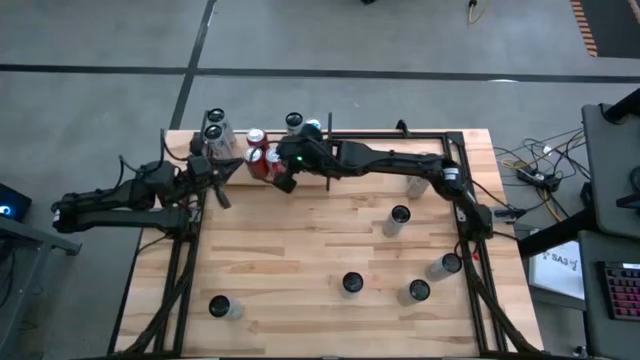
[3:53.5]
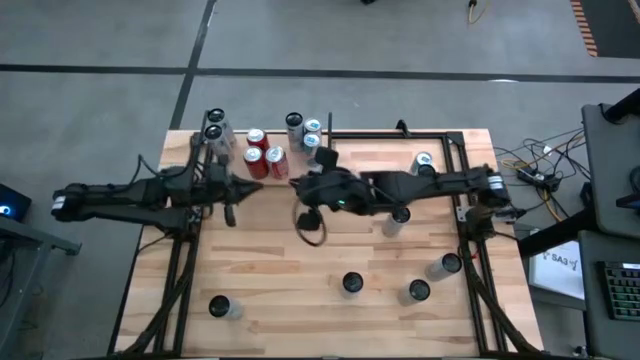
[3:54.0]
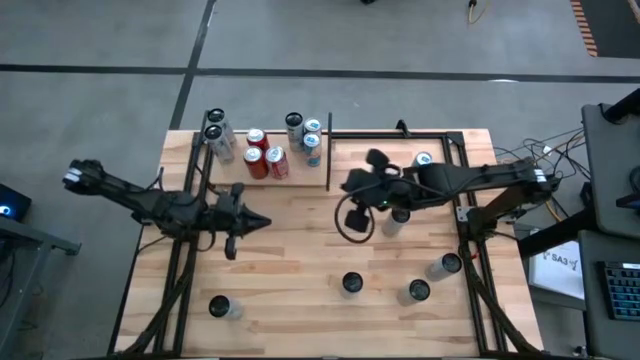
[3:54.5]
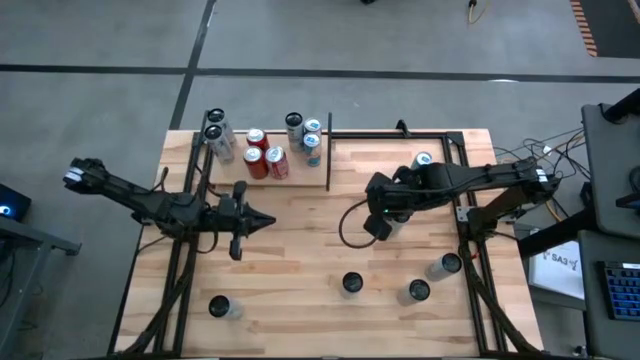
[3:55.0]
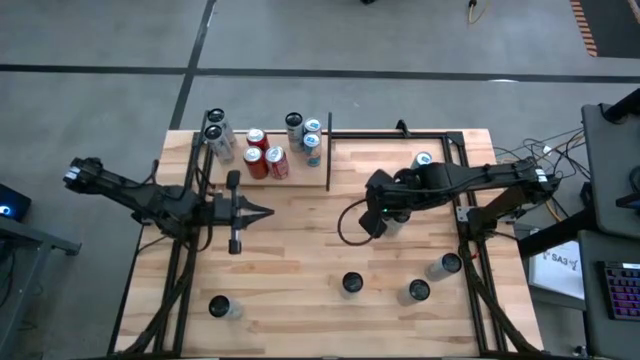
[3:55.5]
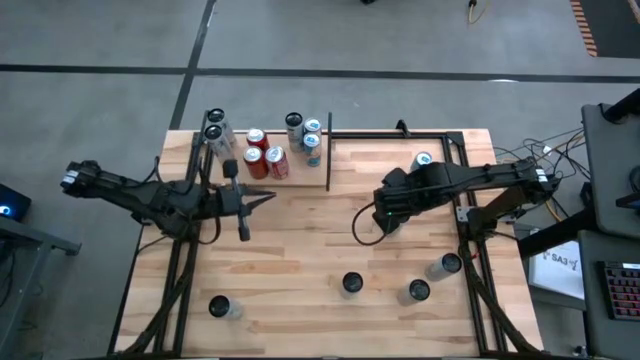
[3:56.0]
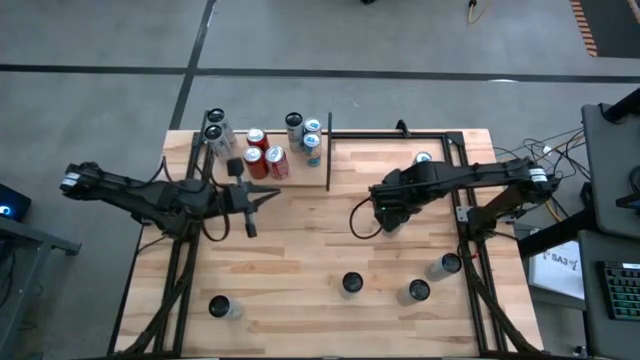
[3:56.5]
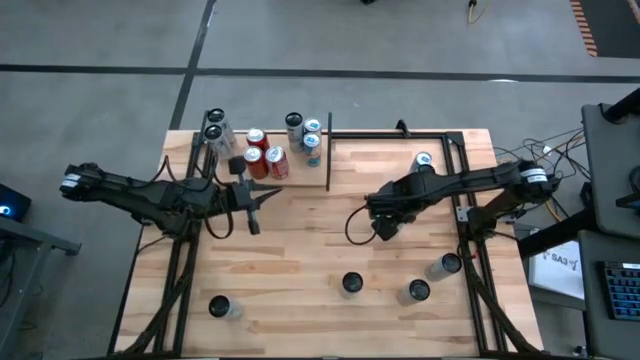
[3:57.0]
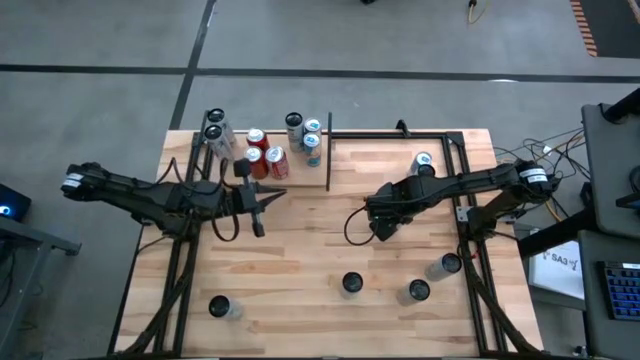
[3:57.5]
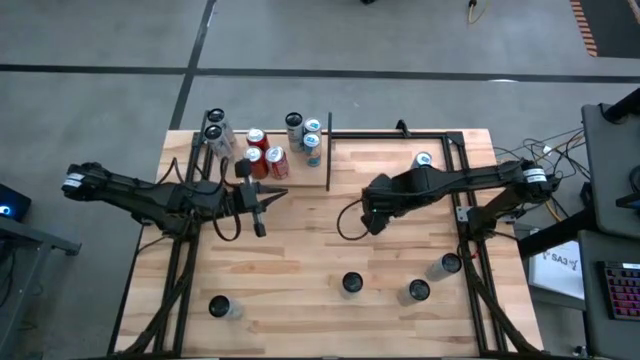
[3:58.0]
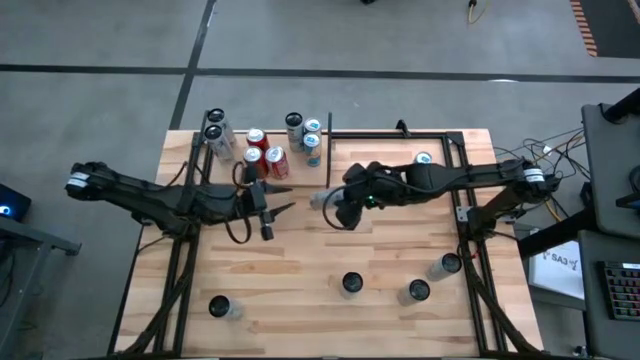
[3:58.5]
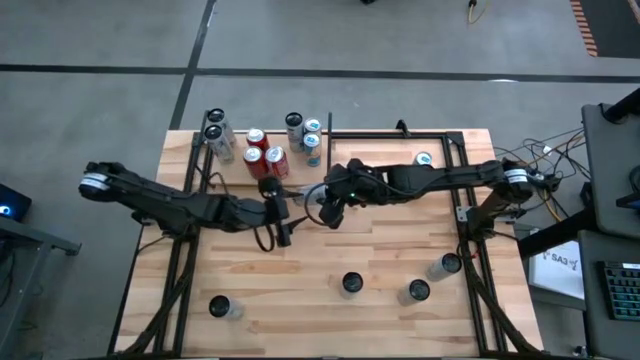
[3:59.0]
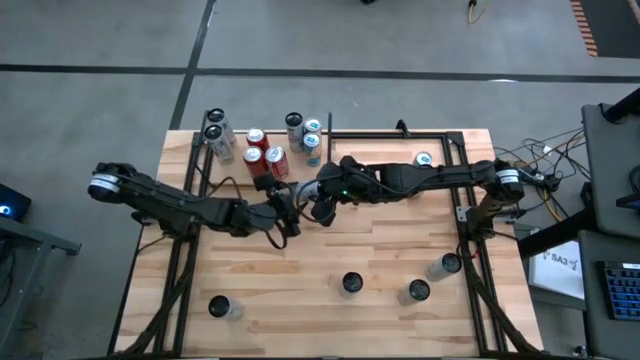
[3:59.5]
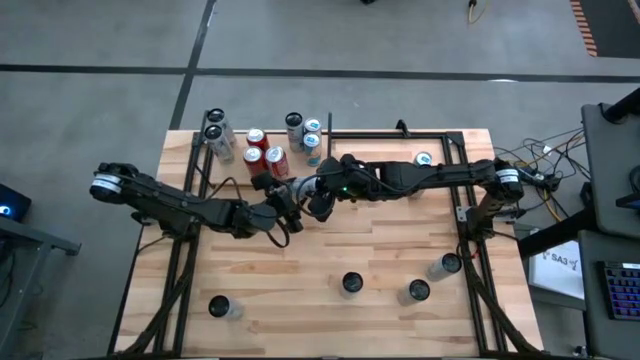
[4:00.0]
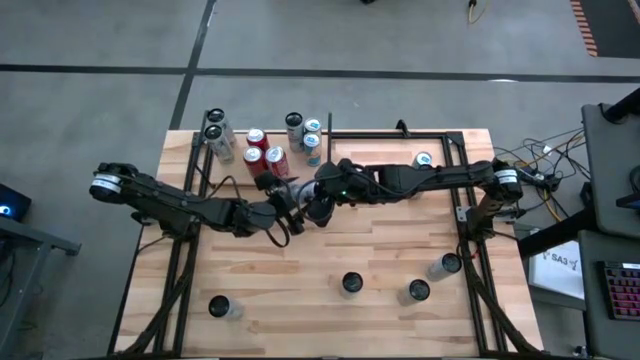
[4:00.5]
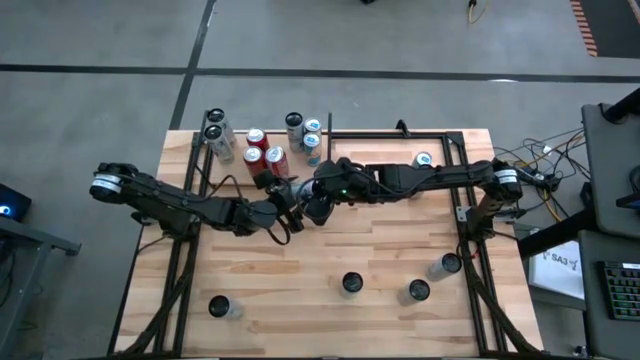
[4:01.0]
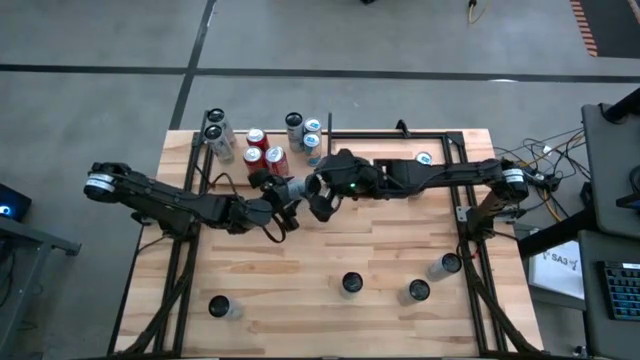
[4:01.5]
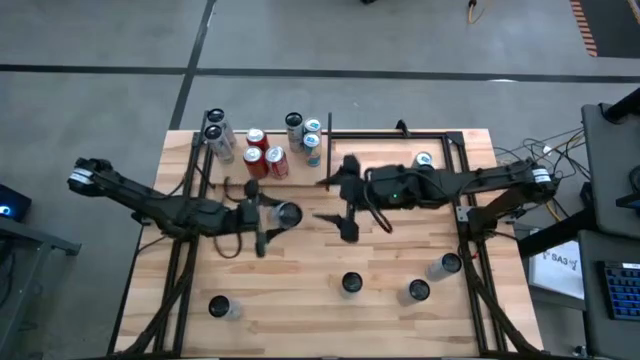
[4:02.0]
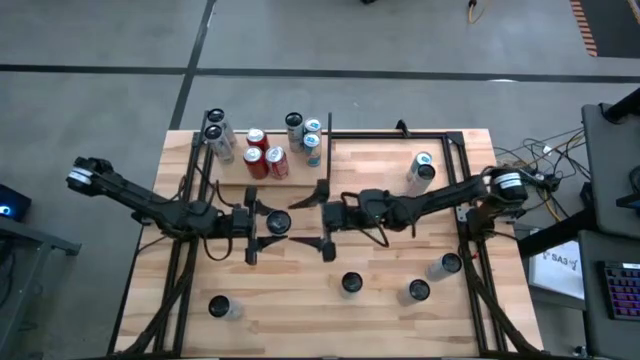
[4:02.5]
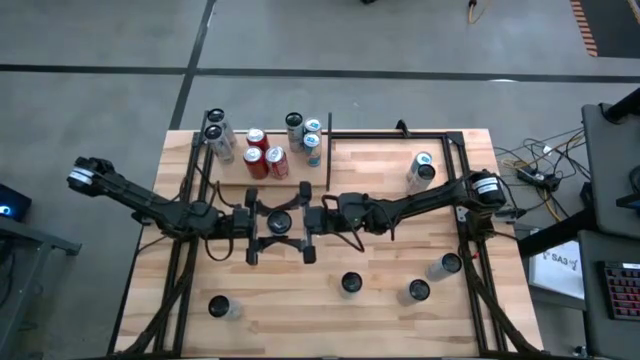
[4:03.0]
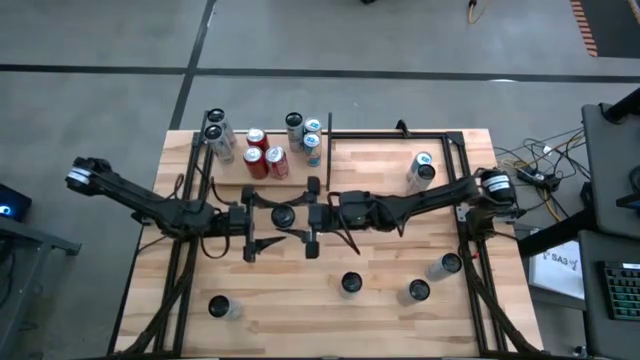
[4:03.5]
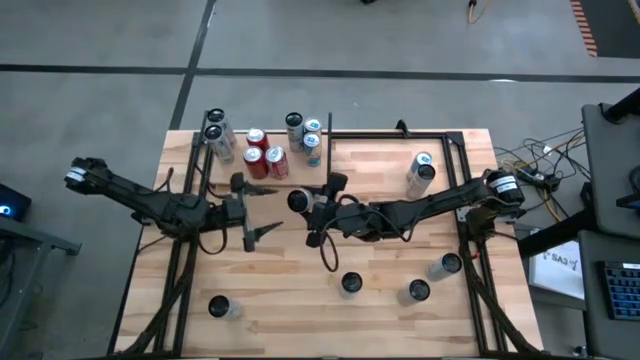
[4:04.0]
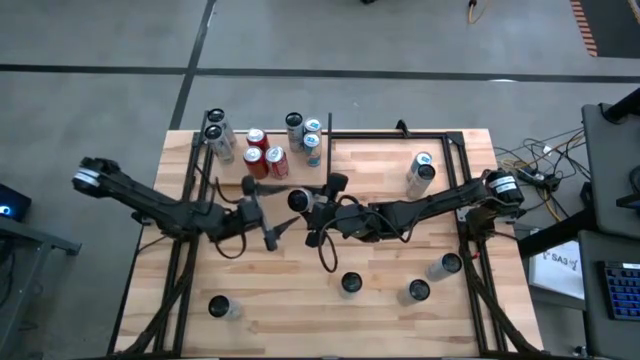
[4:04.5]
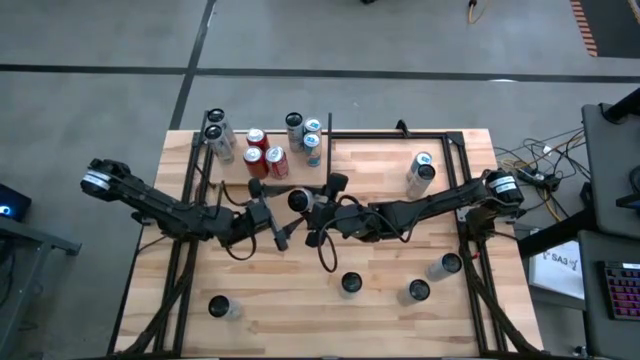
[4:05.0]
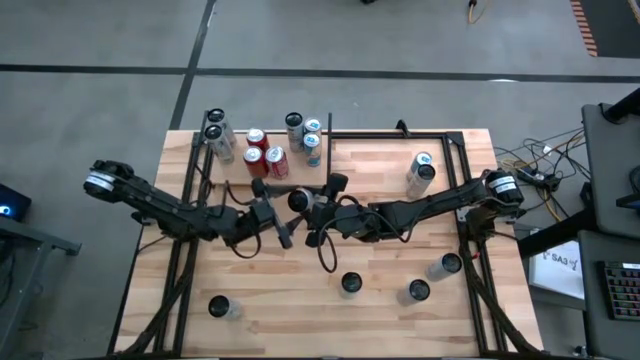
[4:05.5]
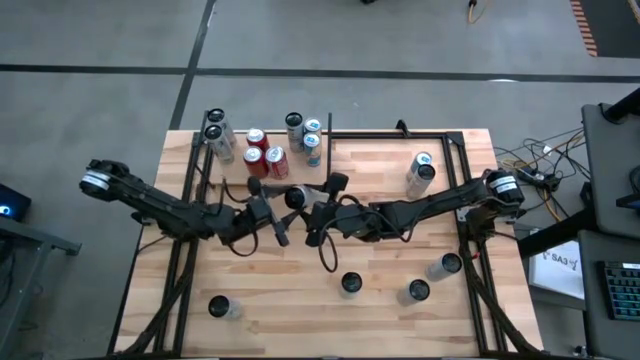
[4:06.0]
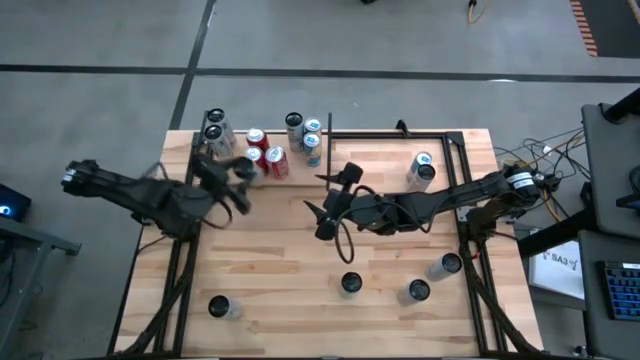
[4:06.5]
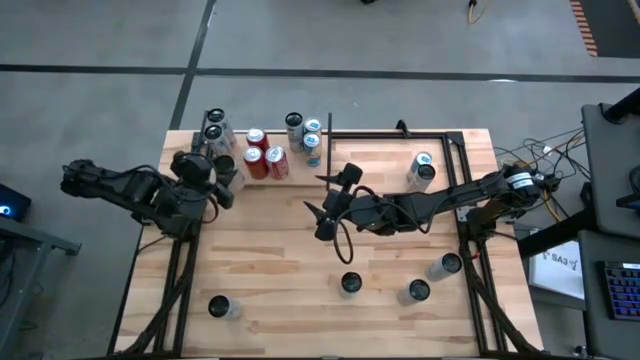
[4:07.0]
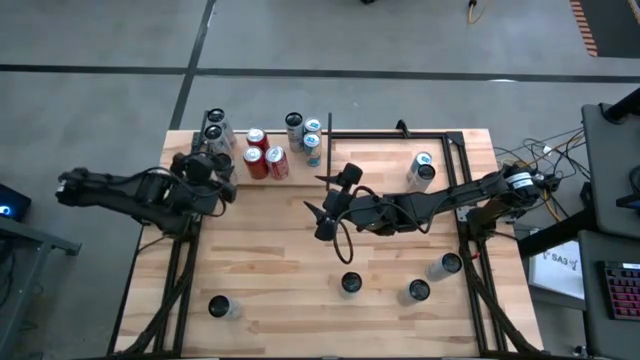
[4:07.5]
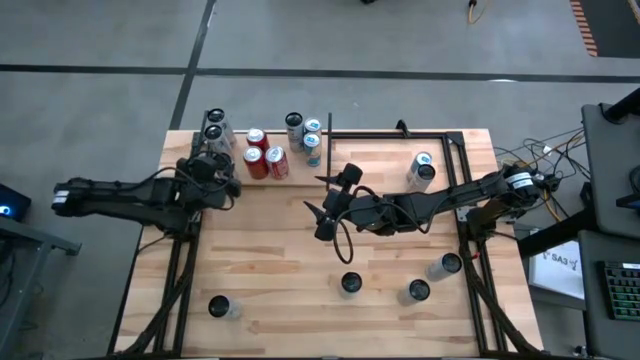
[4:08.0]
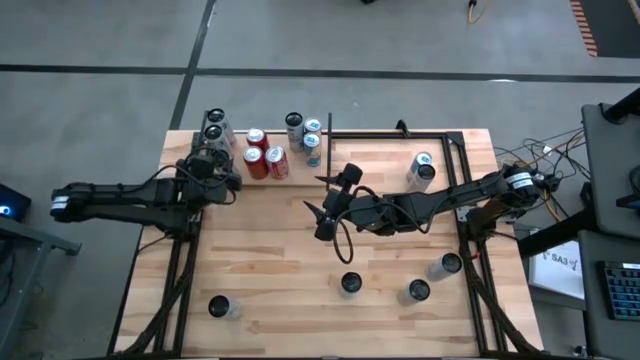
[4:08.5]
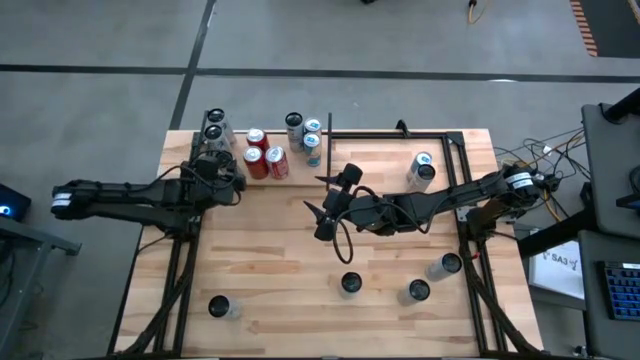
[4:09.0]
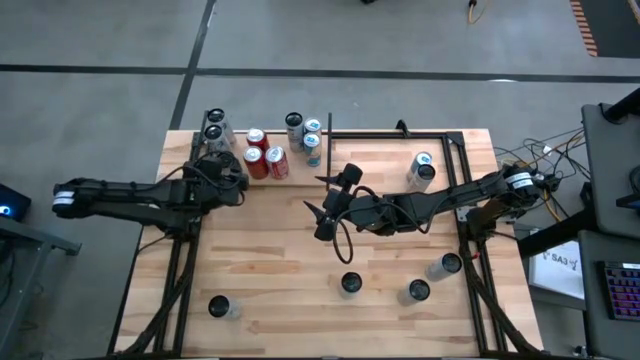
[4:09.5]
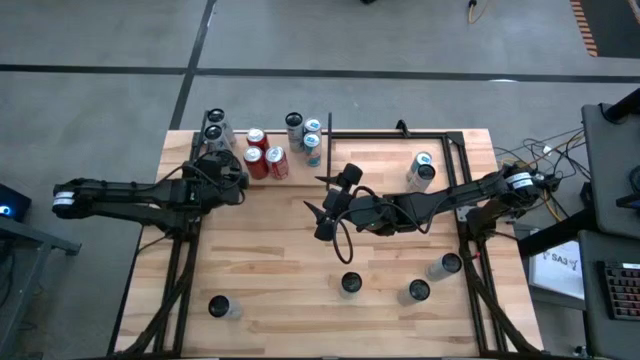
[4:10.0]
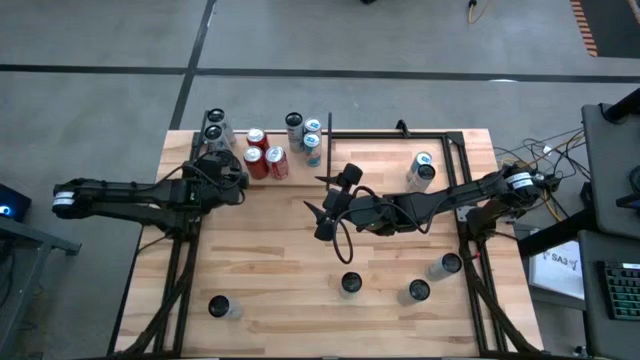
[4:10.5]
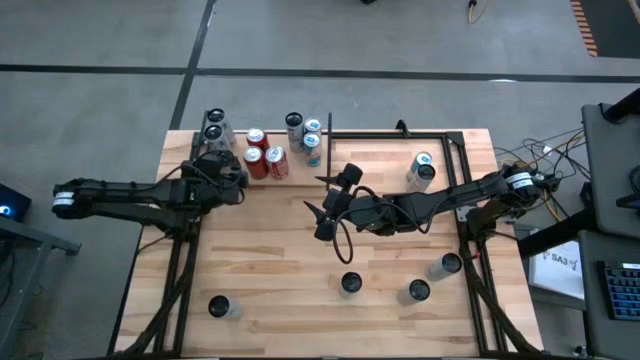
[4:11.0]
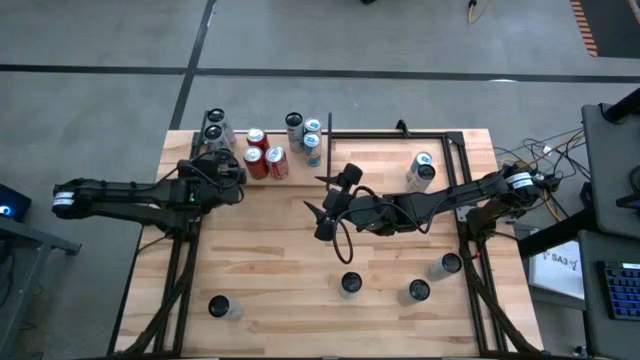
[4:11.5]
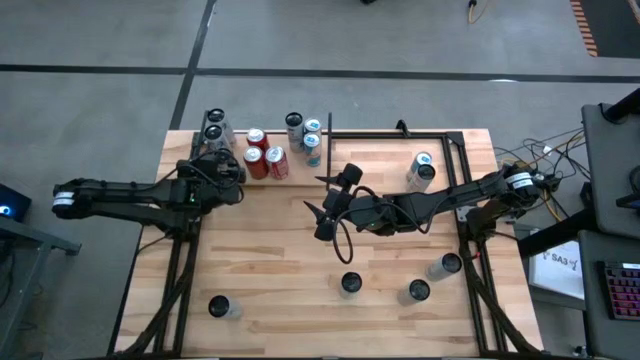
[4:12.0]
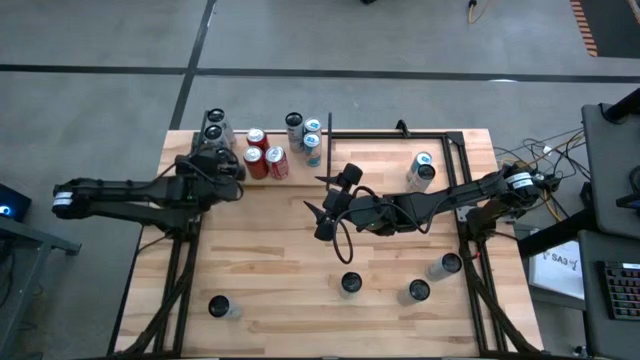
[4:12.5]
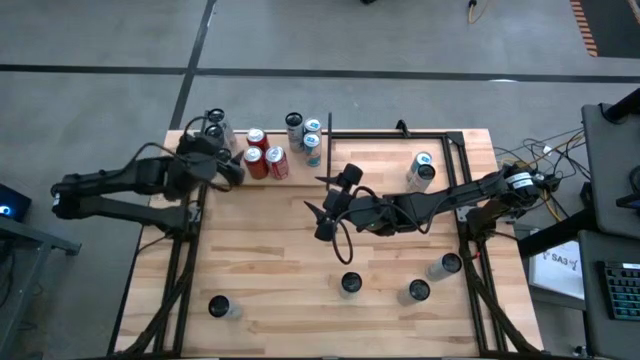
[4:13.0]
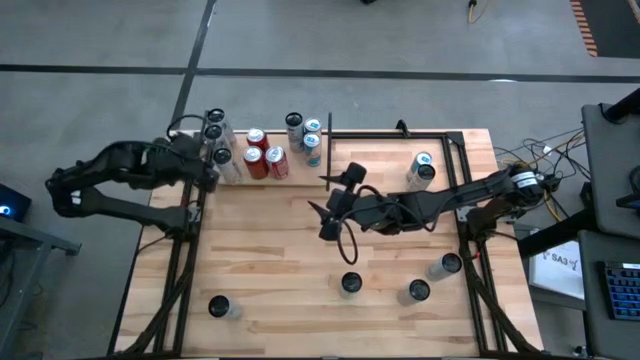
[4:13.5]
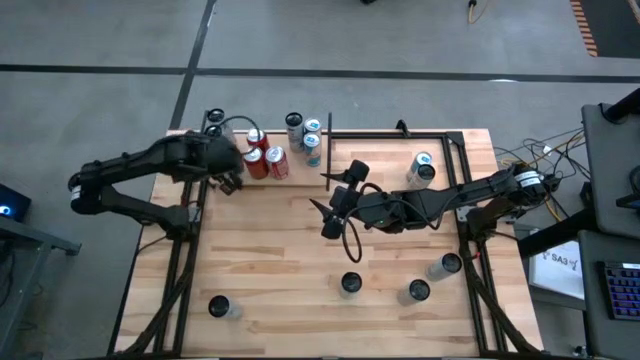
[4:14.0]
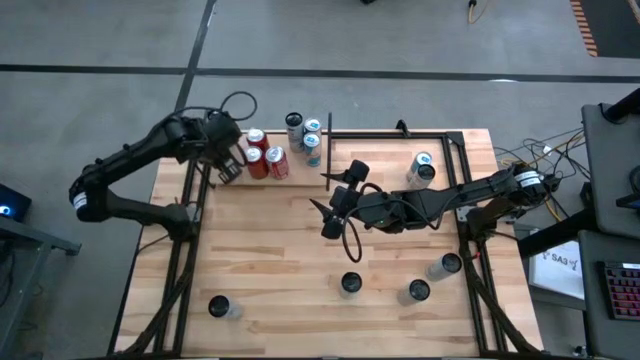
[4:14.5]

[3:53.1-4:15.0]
Task: Place canned beverage on shelf
Put the middle left white and yellow soda can on the shelf
